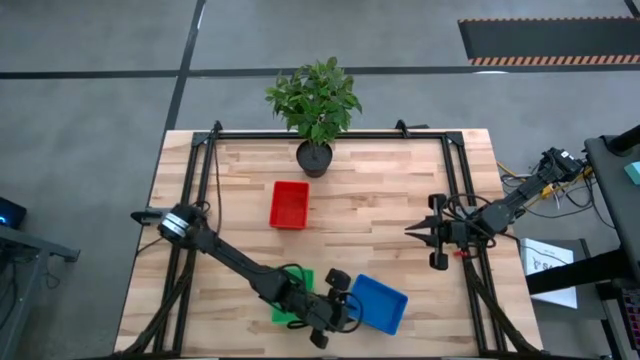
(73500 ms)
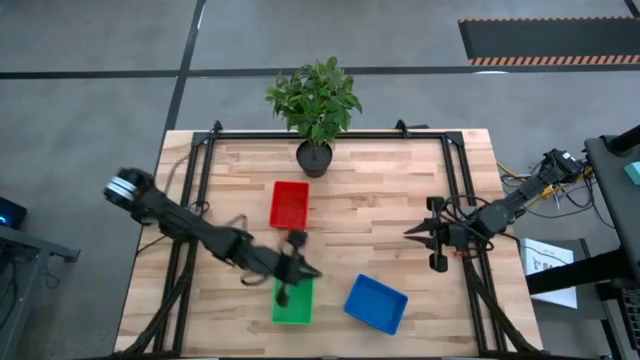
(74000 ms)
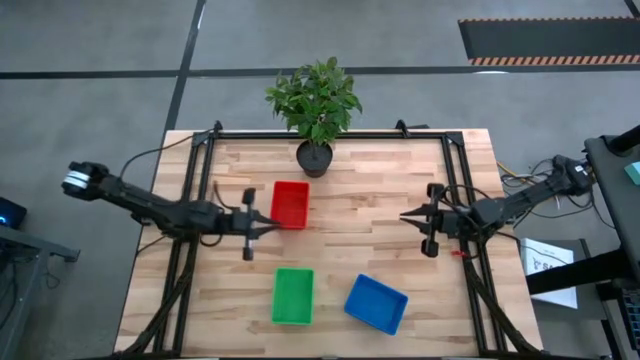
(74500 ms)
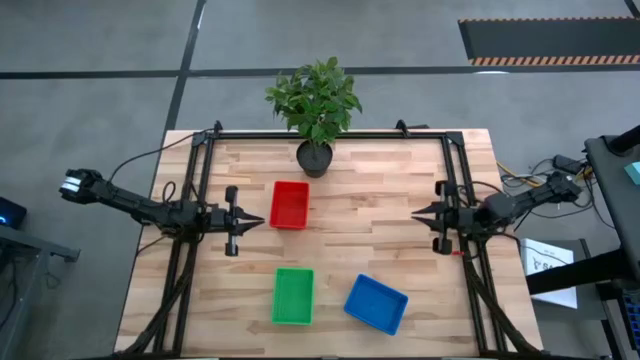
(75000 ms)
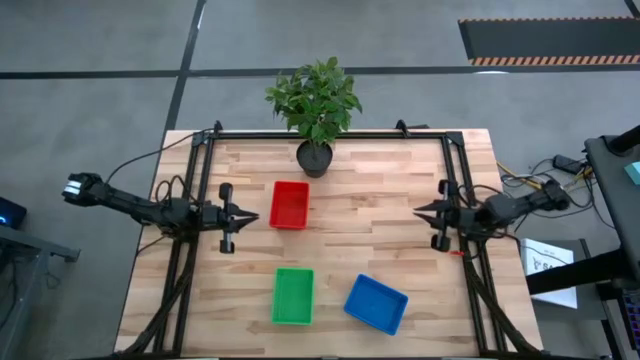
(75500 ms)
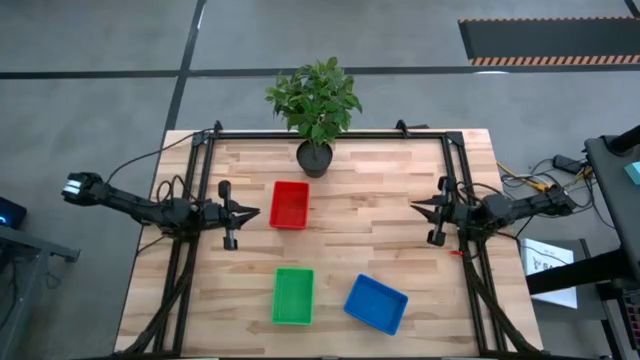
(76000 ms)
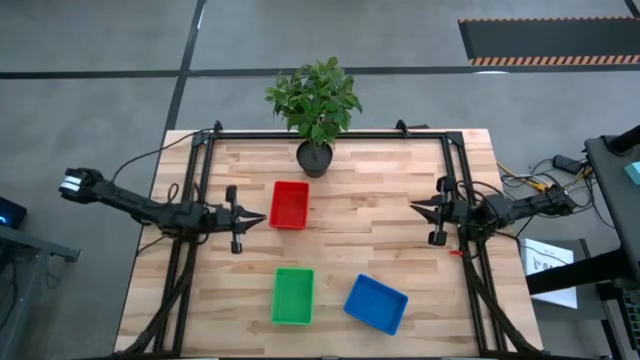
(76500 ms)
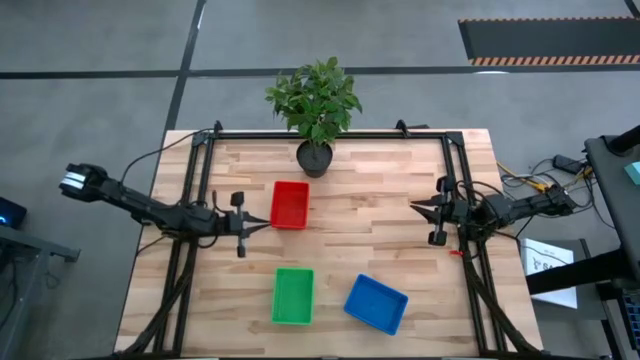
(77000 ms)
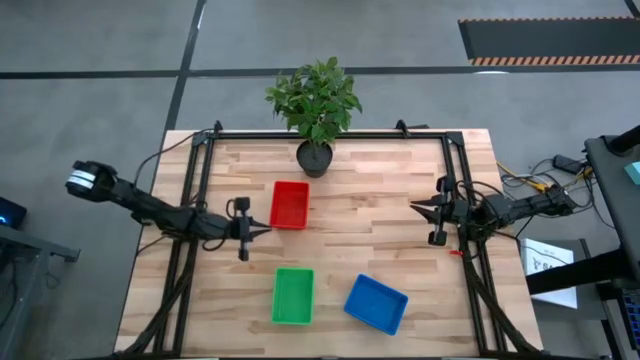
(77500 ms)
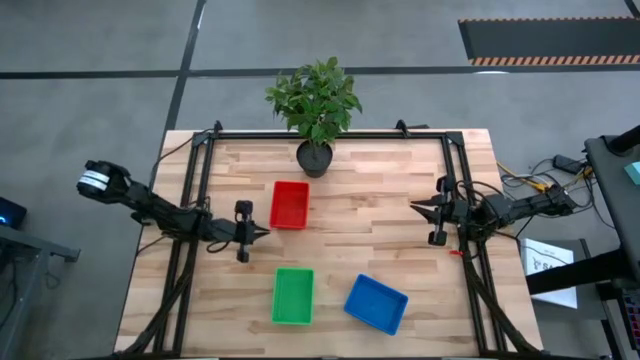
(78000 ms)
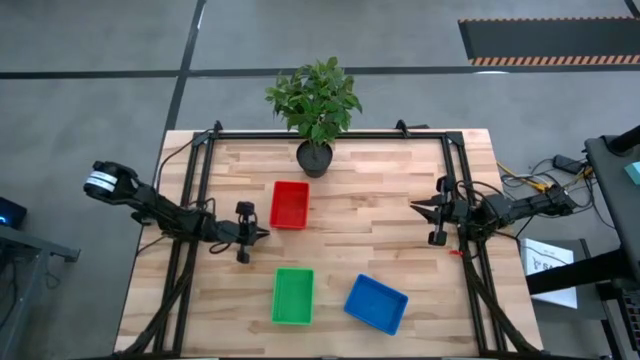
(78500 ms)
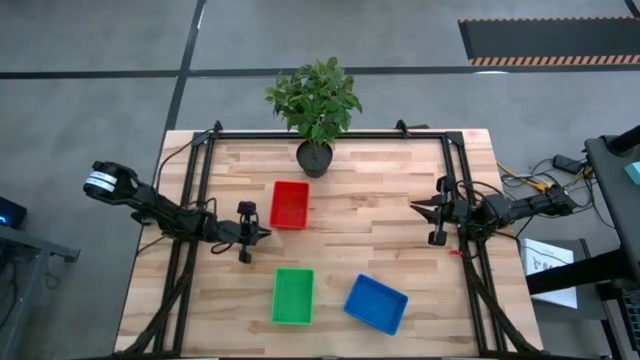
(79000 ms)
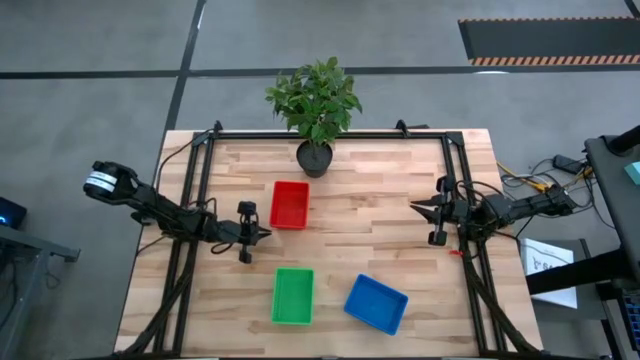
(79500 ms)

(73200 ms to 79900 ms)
Return to Home Position
